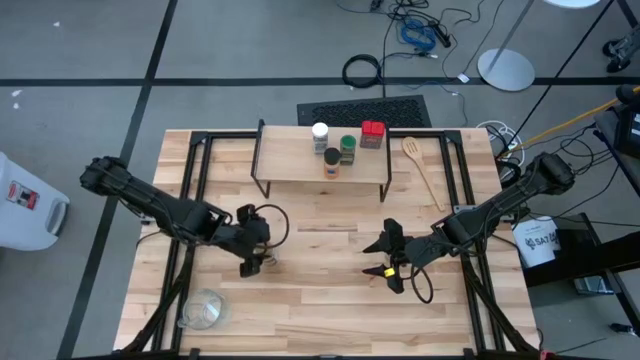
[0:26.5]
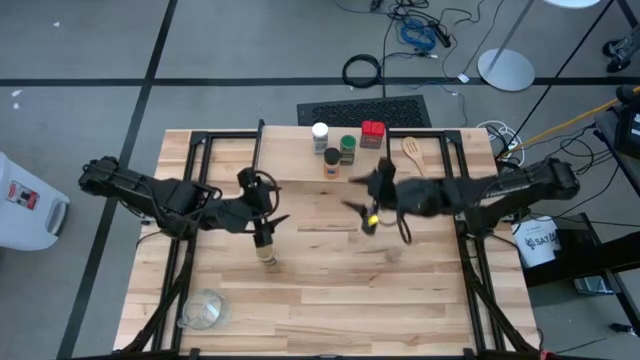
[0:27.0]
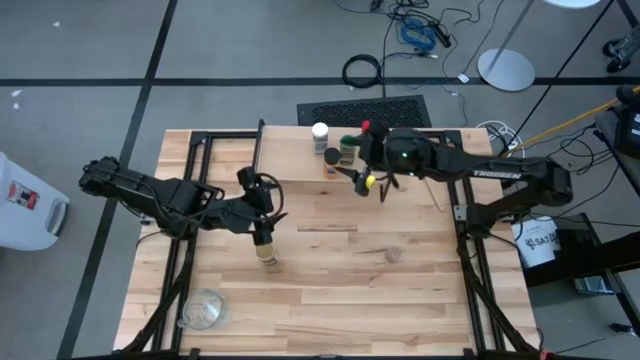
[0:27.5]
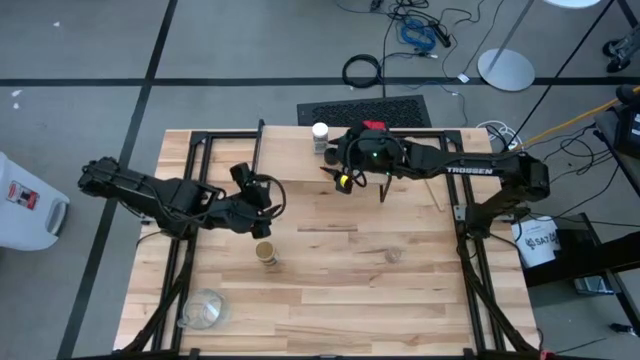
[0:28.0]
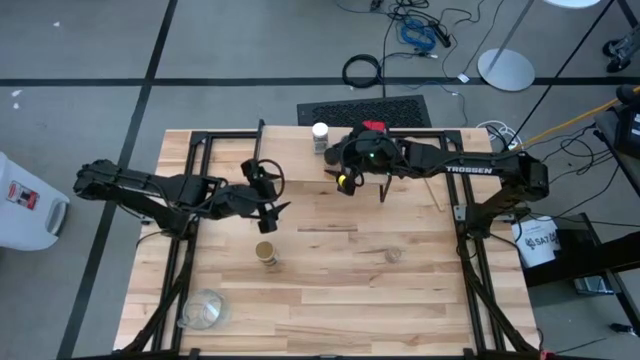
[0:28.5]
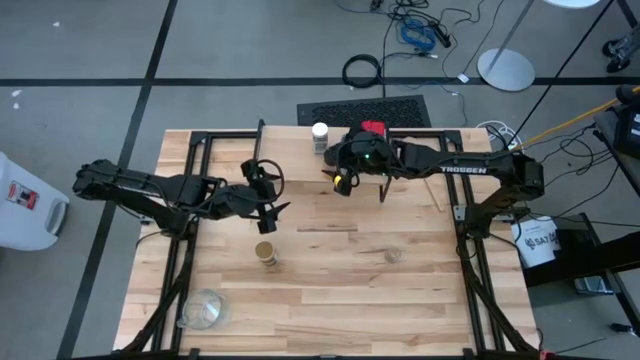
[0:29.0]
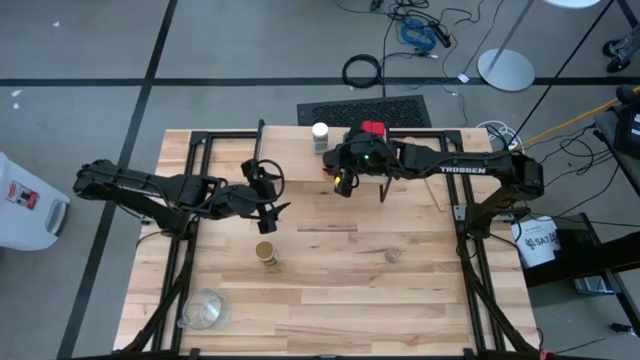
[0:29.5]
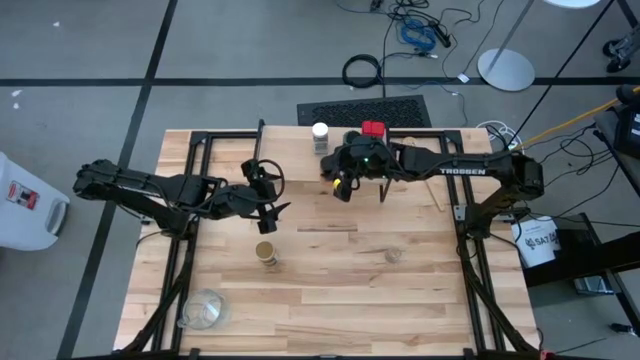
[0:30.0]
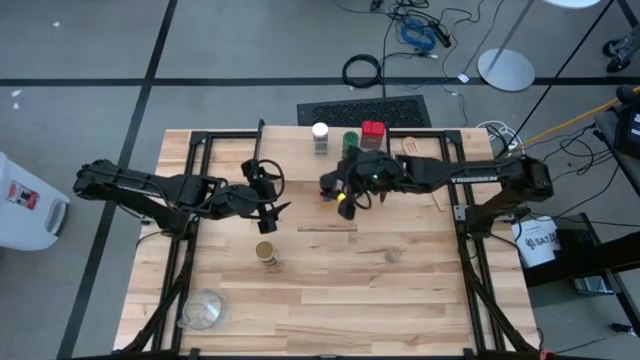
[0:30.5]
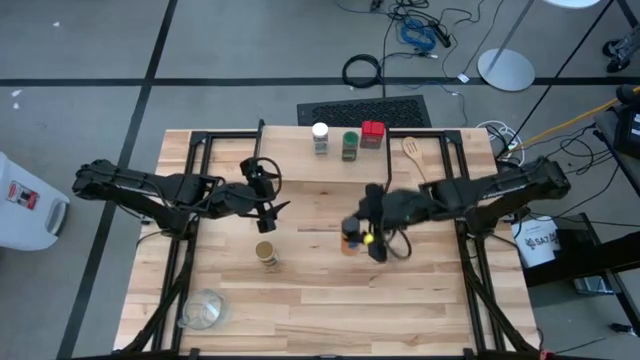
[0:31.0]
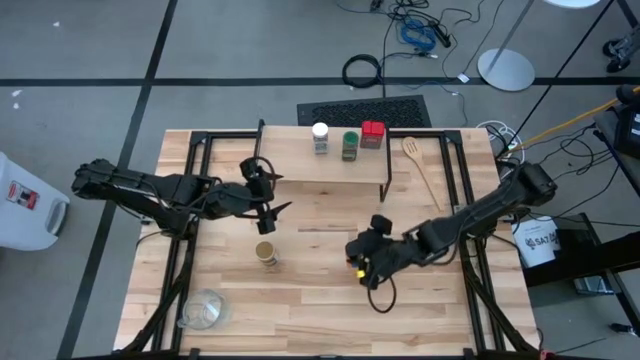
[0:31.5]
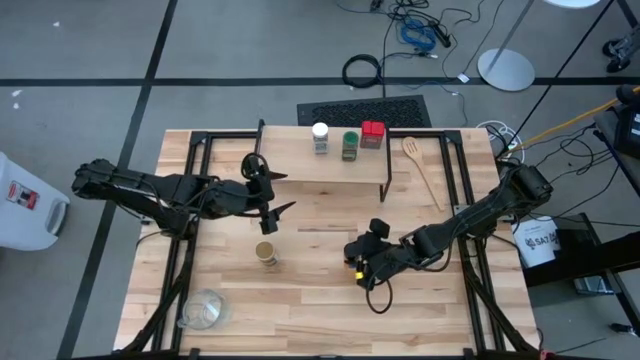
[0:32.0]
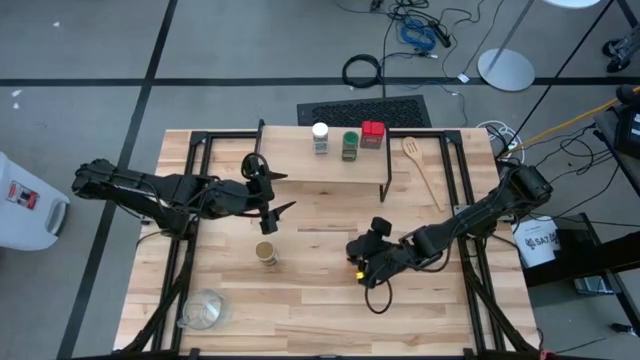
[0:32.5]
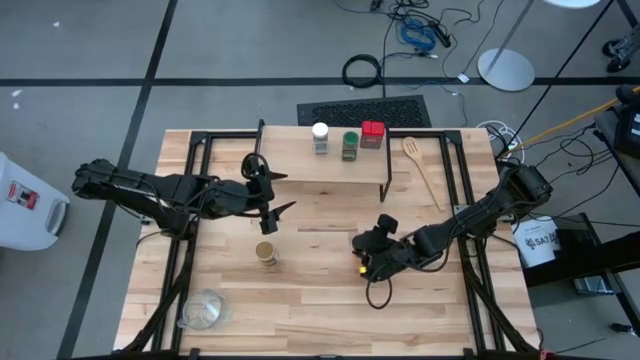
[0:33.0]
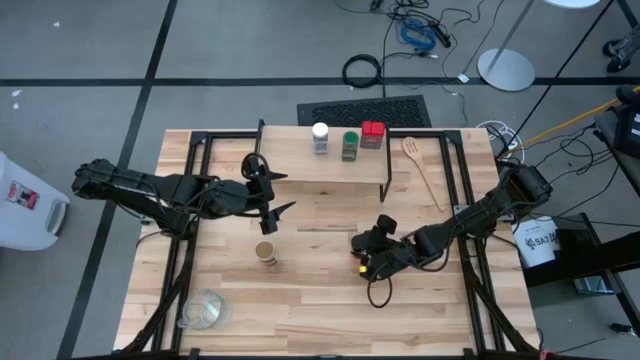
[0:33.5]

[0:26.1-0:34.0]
Task: Shelf spices
Remove the black seasoning bottle from the shelf

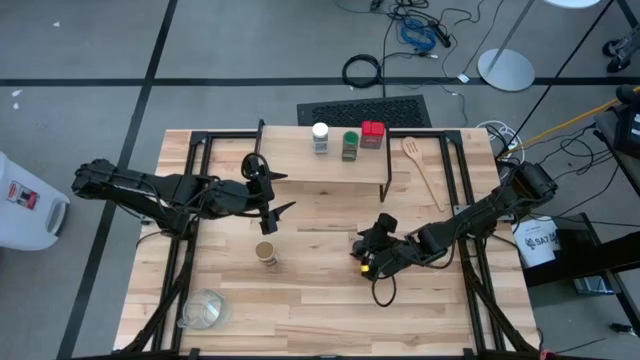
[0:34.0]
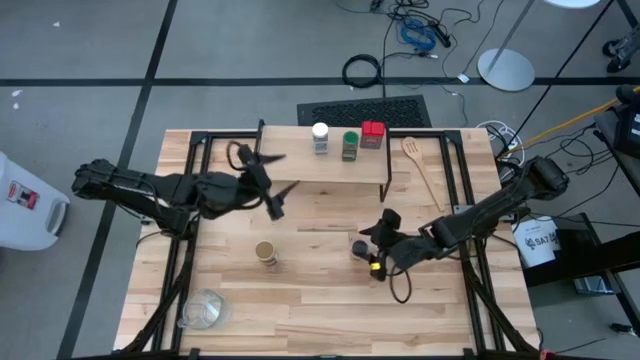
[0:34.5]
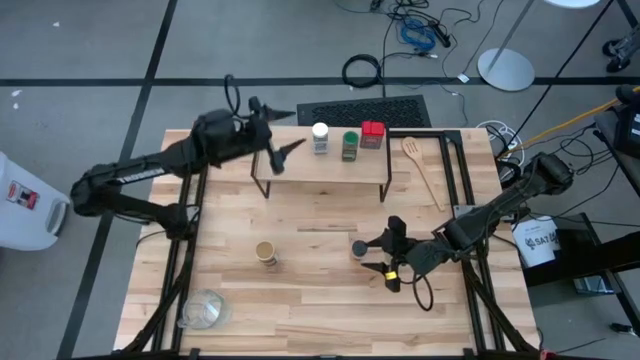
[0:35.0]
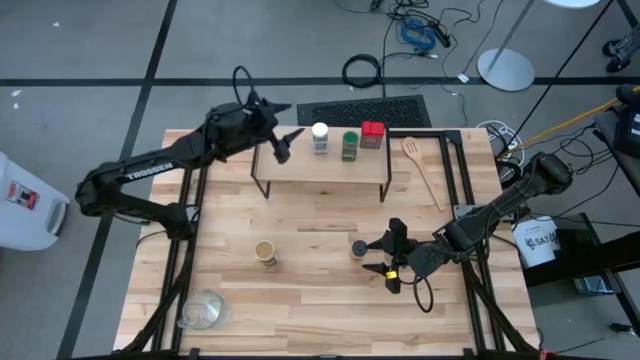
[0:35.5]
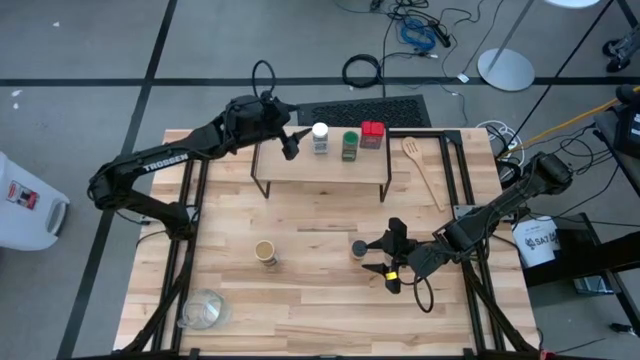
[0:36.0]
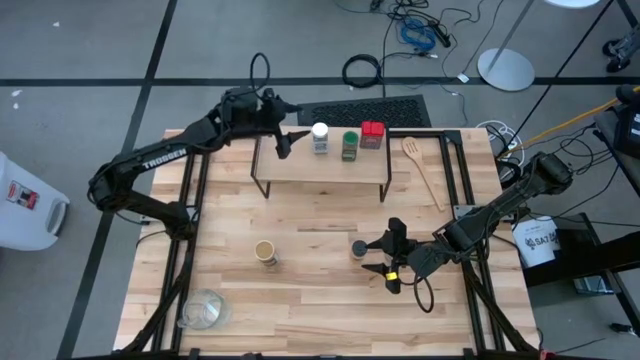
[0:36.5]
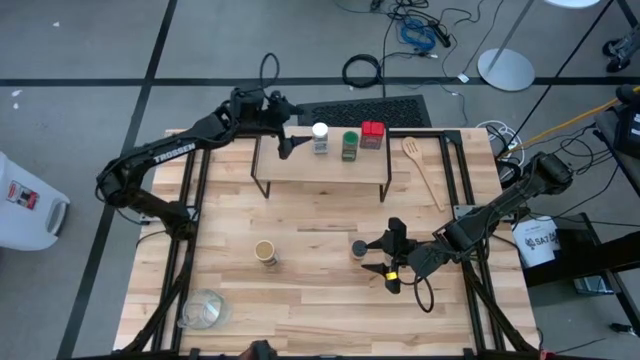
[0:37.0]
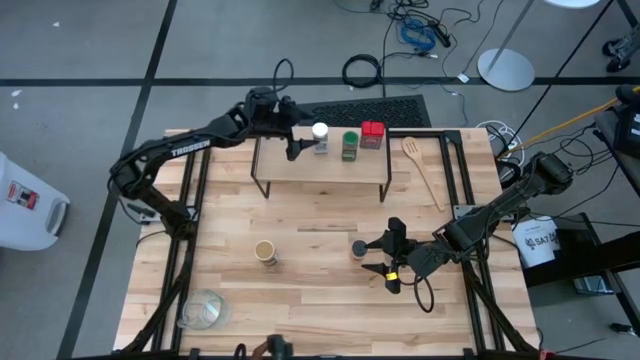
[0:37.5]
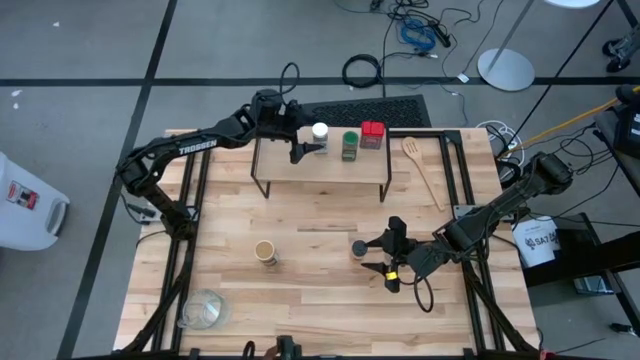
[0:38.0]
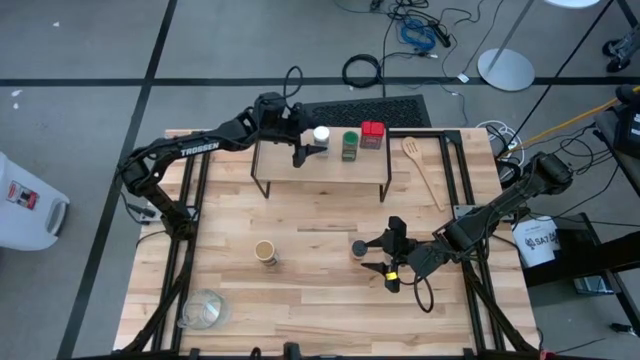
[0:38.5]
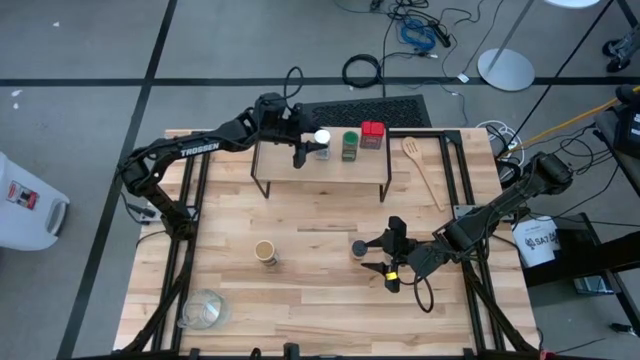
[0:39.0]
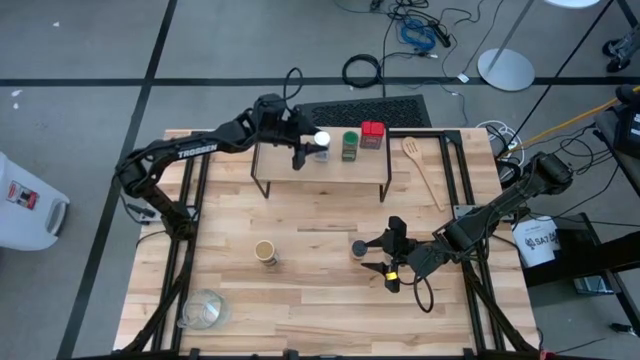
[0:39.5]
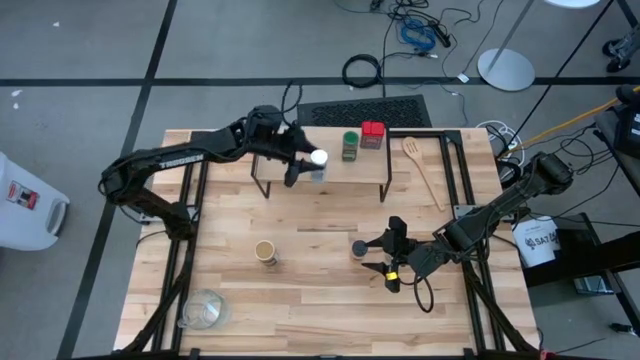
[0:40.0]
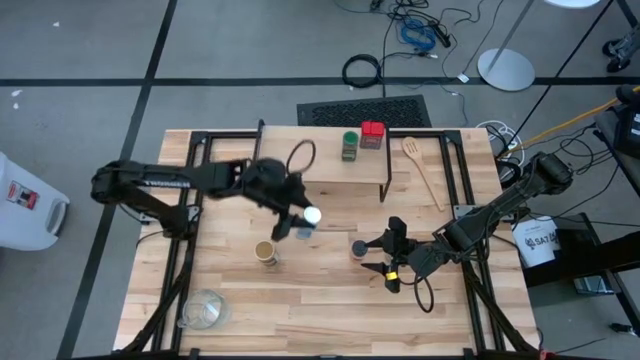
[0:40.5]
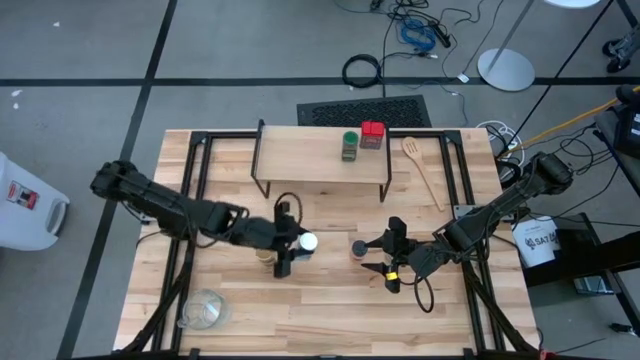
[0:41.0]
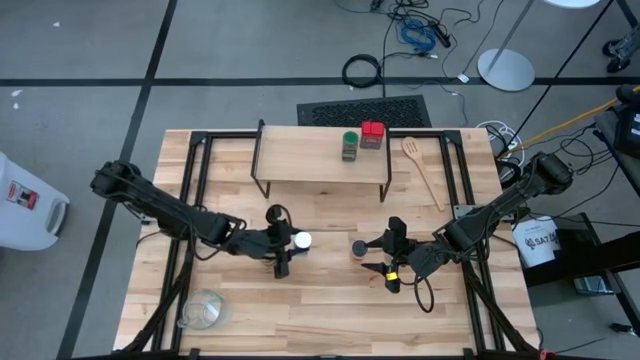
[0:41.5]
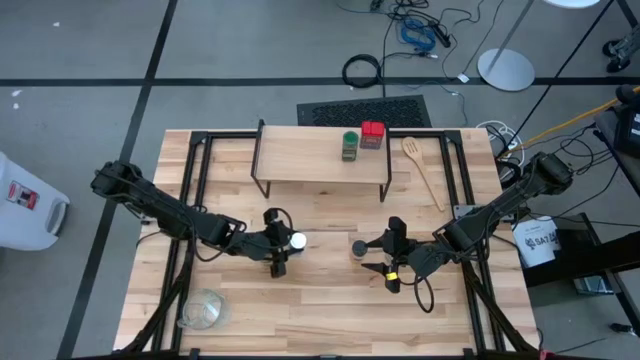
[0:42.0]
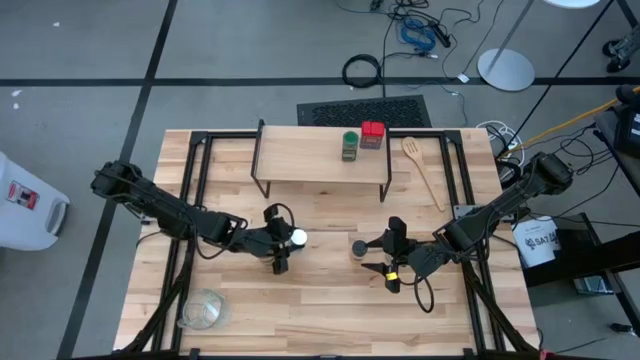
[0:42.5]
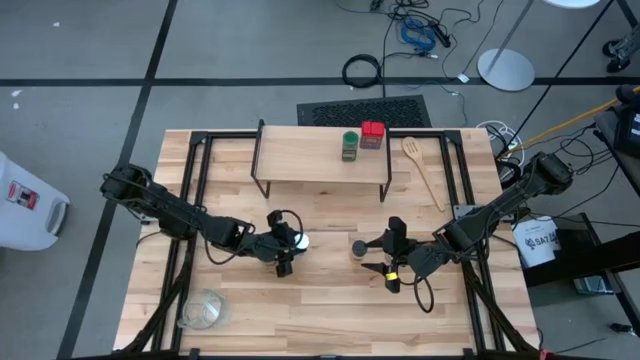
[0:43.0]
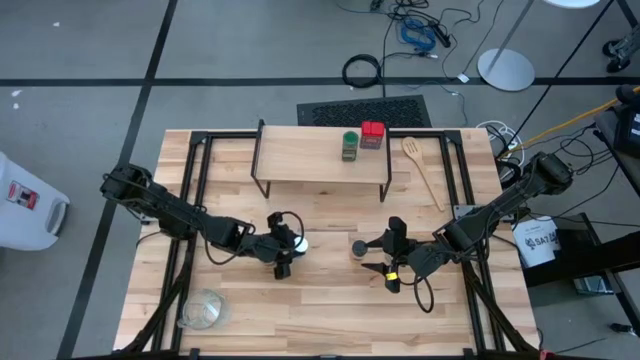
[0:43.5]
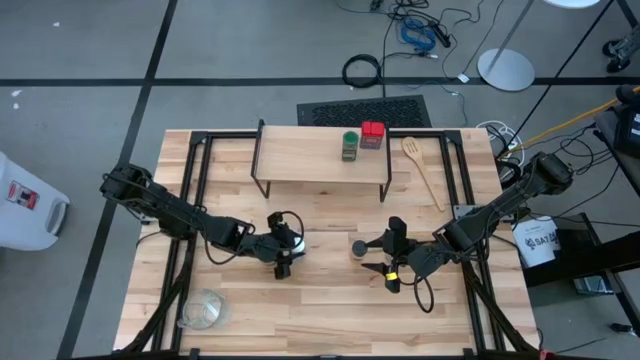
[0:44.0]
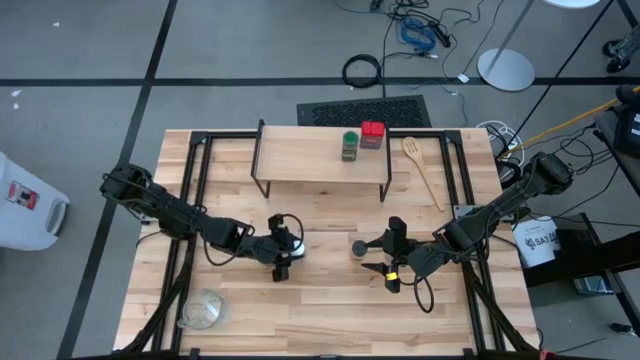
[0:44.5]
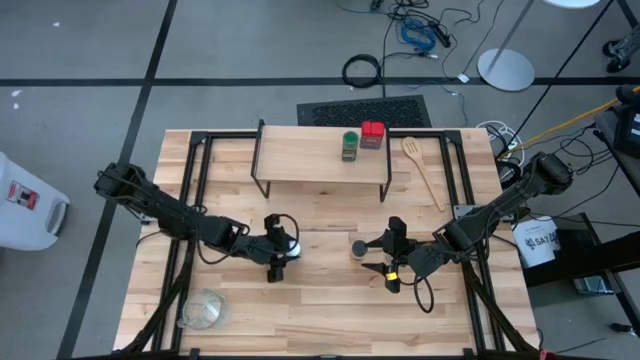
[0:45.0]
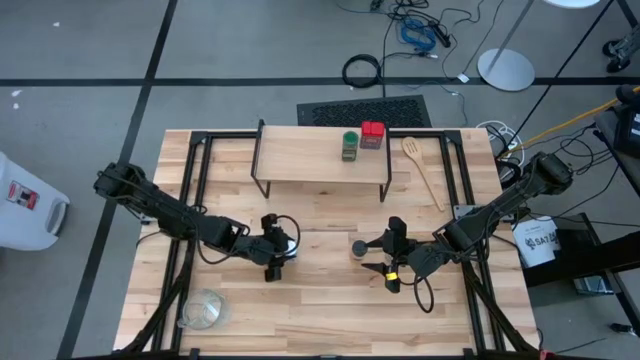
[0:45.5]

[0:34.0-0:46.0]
Remove the white seasoning bottle from the shelf
